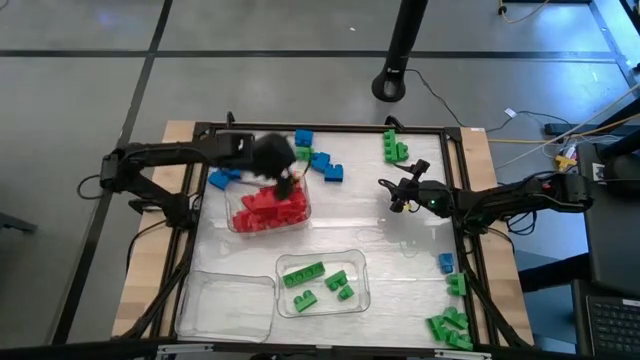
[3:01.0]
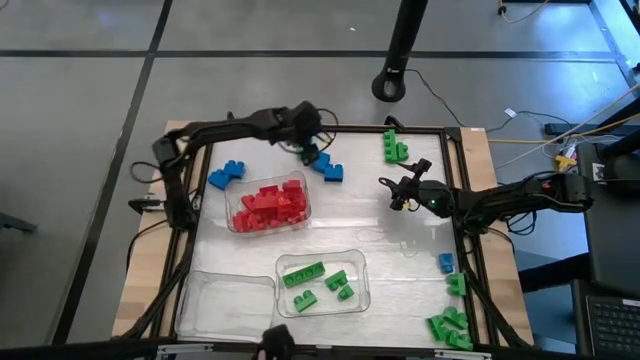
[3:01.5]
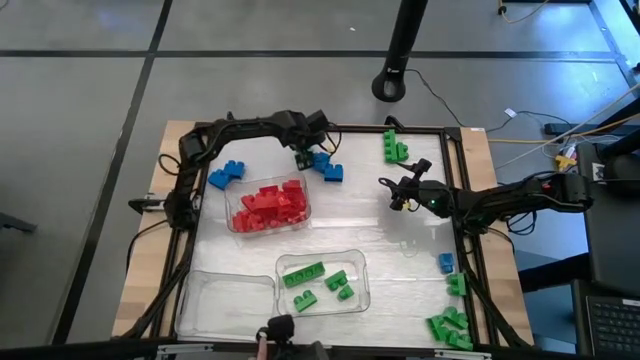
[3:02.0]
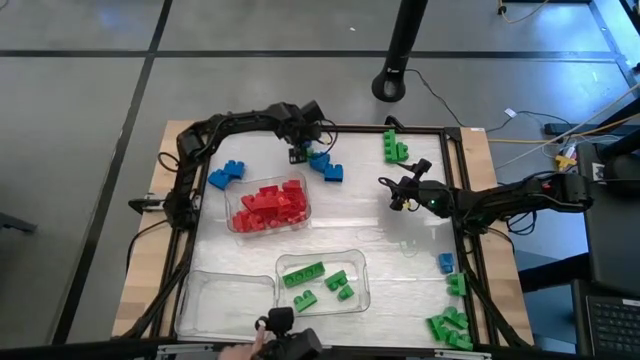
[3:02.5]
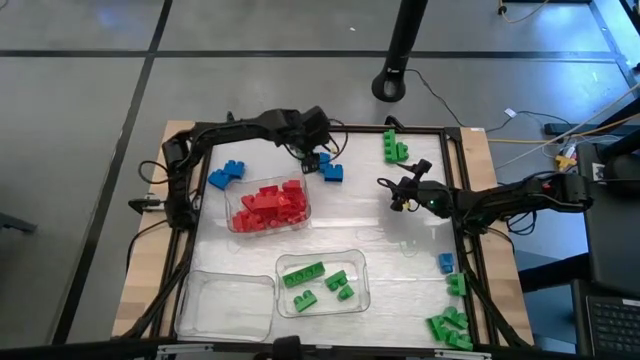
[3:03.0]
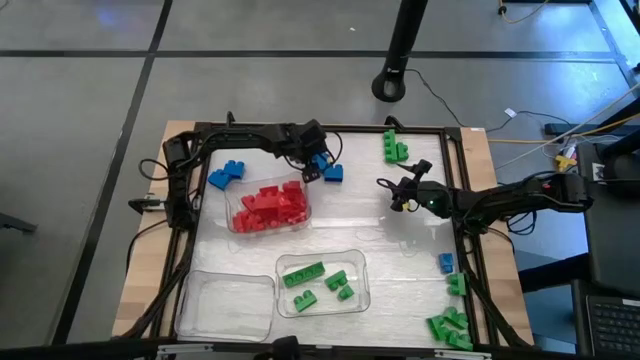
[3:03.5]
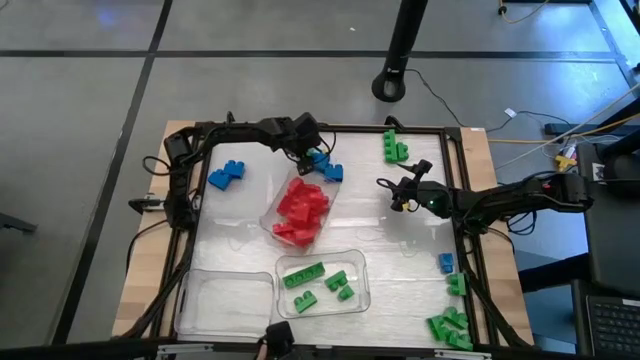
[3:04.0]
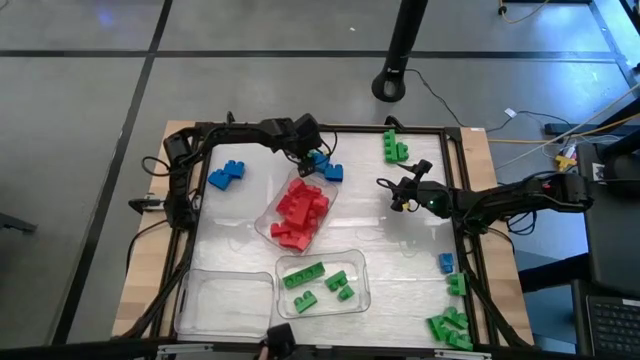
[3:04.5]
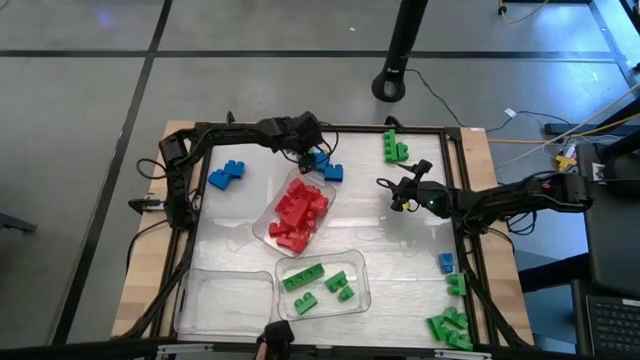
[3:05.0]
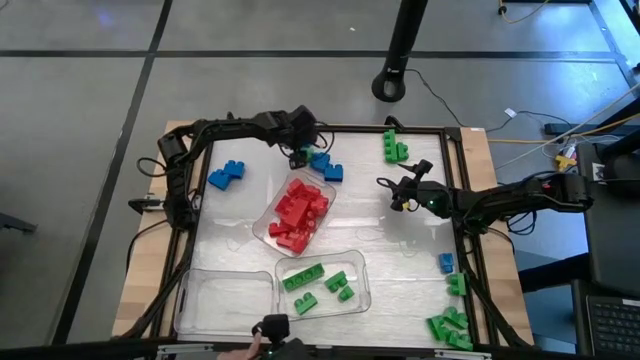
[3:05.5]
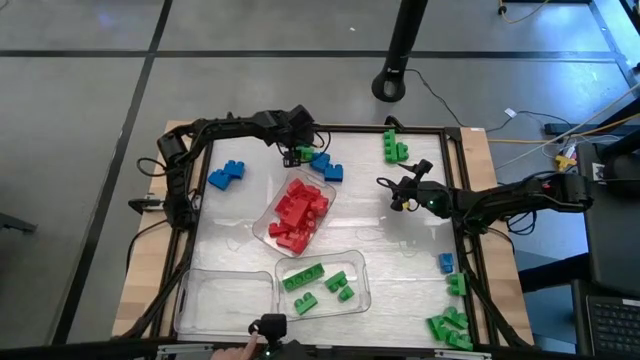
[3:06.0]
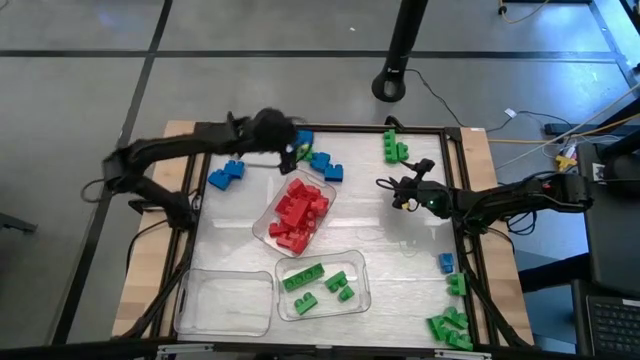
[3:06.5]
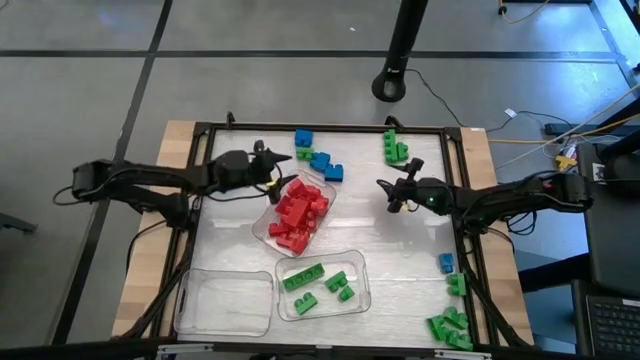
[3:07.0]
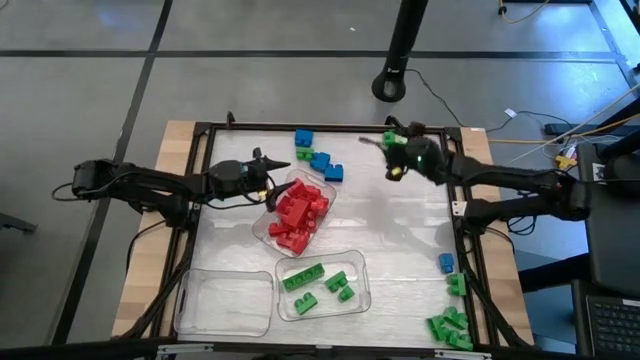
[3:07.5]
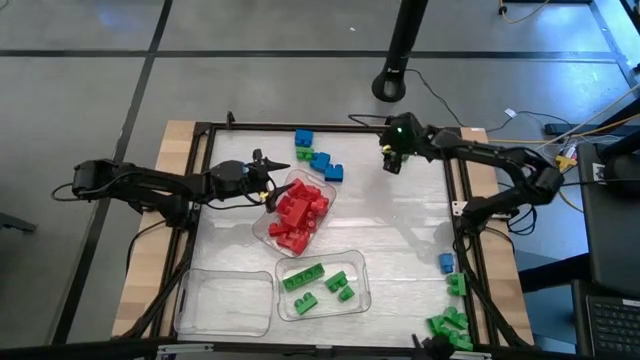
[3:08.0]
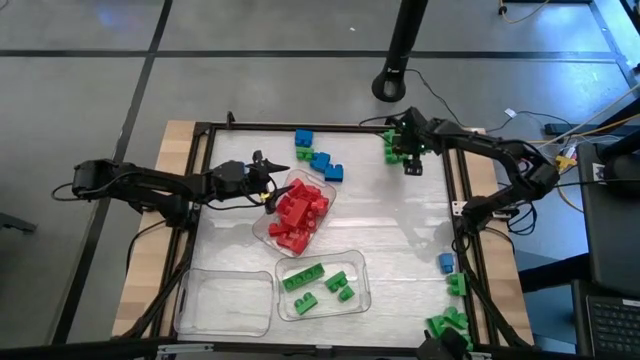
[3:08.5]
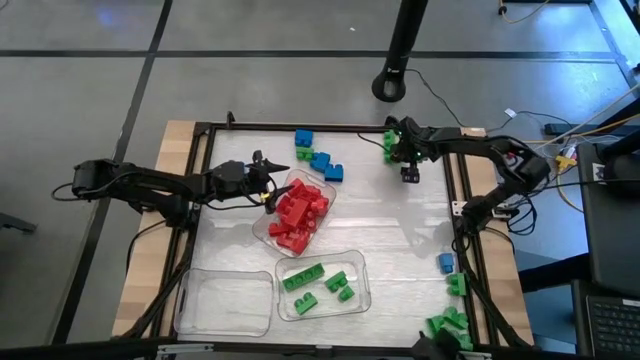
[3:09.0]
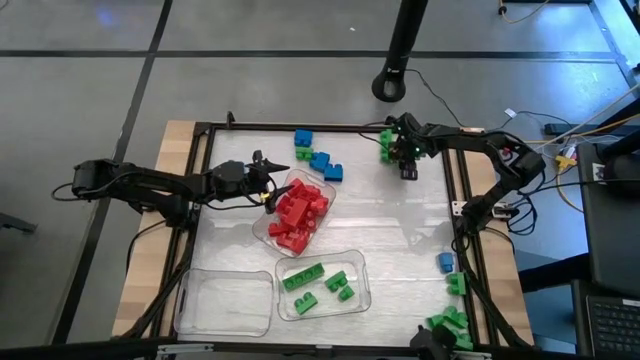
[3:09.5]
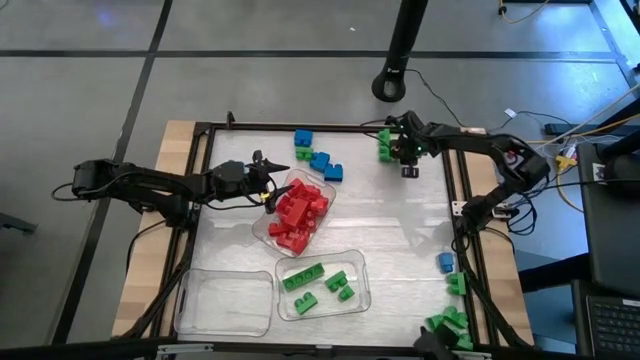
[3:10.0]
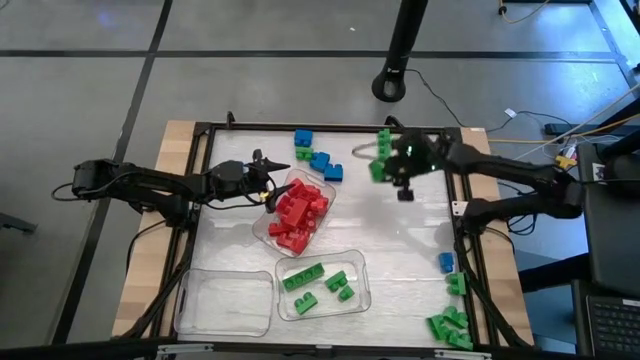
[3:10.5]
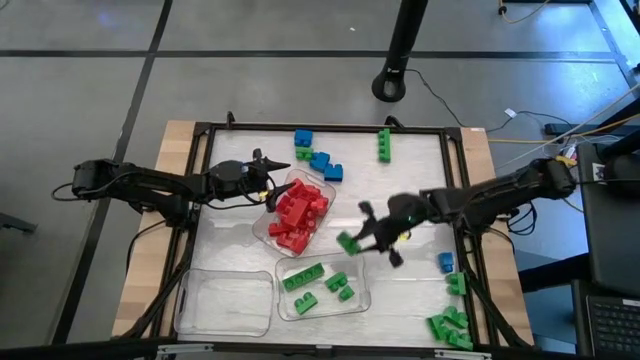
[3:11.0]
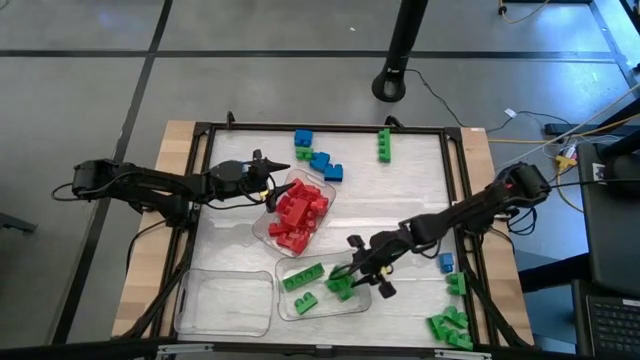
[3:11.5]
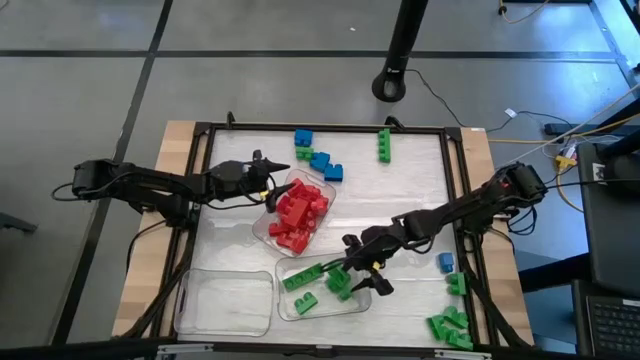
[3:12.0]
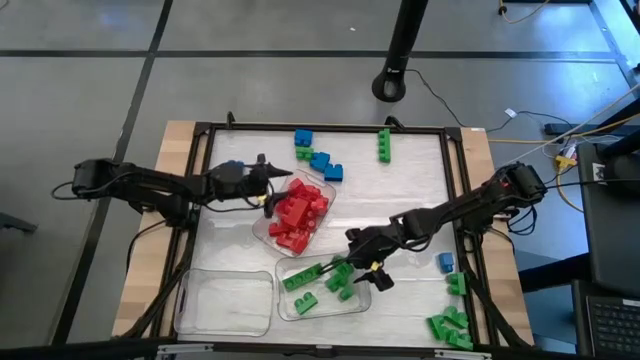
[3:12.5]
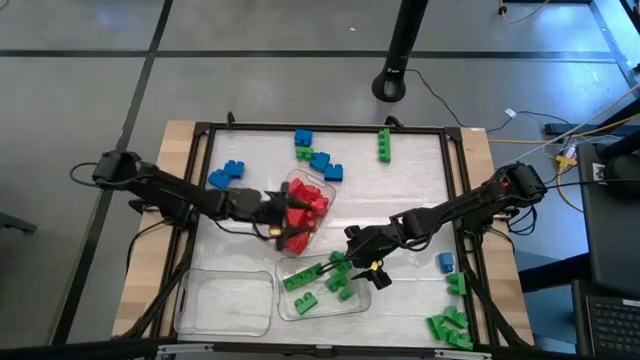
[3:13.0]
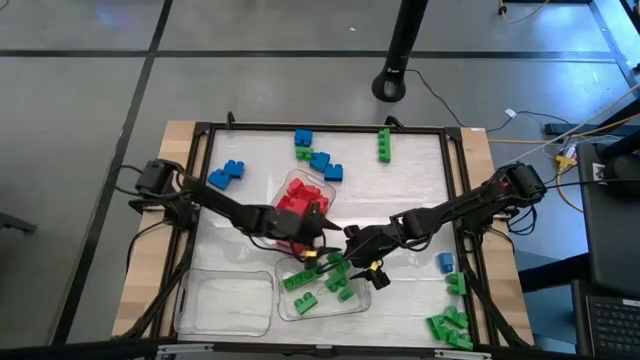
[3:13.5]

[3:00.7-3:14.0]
Task: Sort blocks
Put the green game piece into the bottom right transparent bin

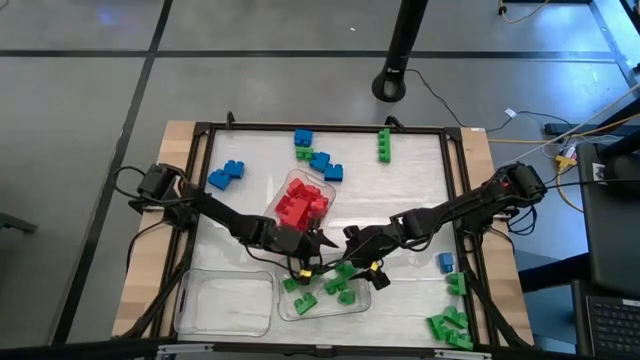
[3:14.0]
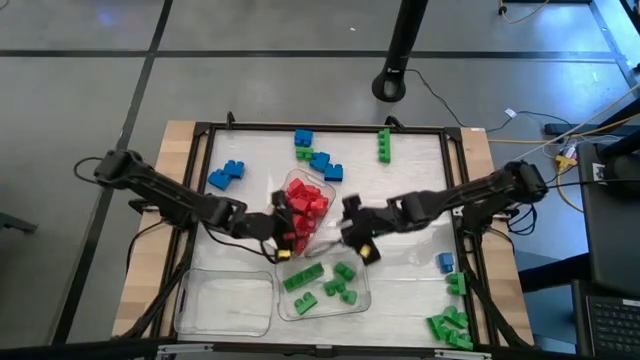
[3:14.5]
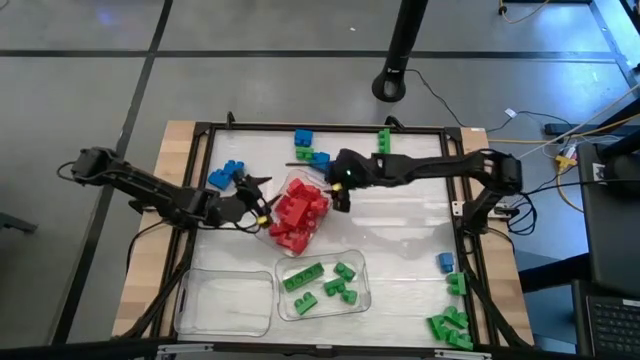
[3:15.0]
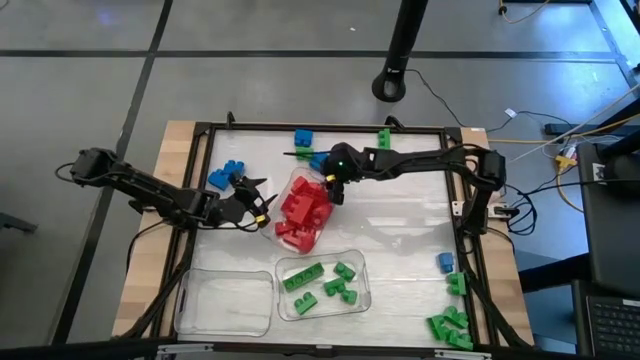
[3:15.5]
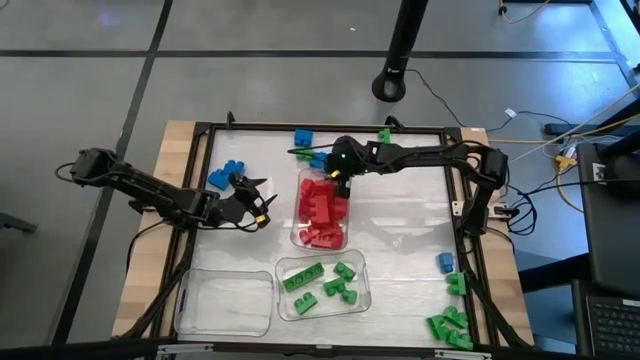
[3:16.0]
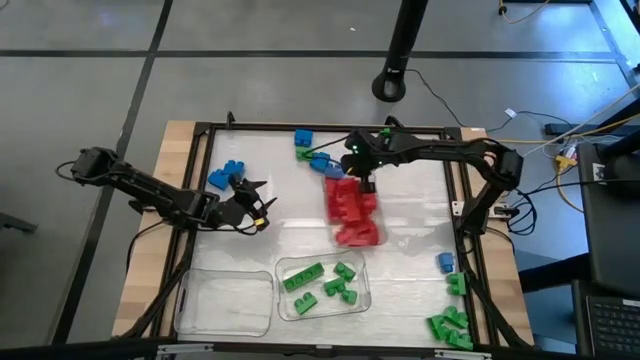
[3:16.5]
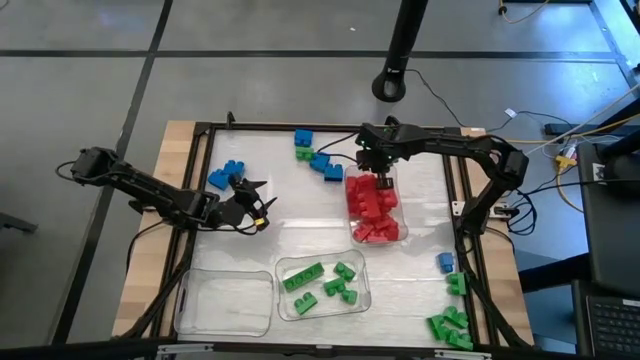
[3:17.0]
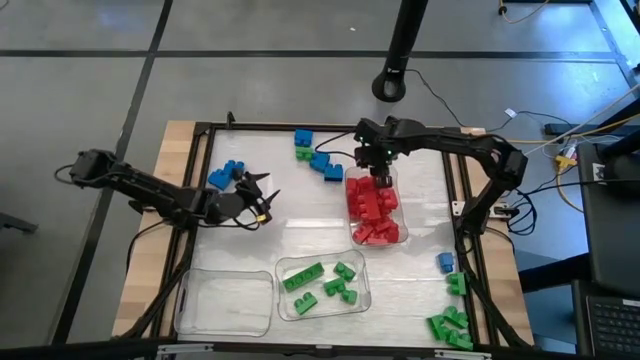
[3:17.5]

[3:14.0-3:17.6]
Adjust the top transparent bin

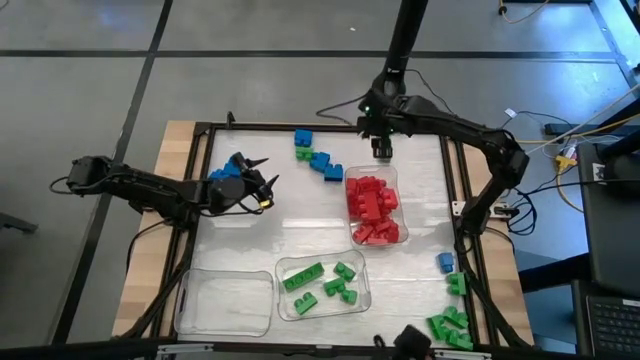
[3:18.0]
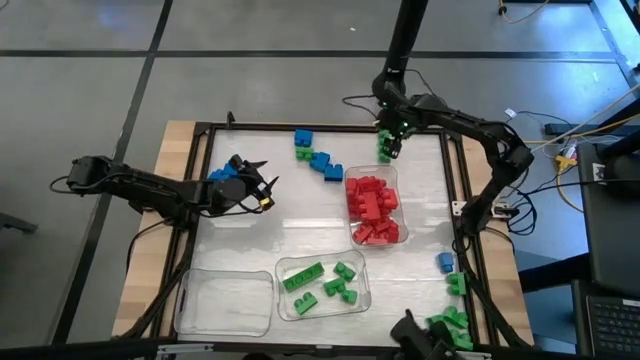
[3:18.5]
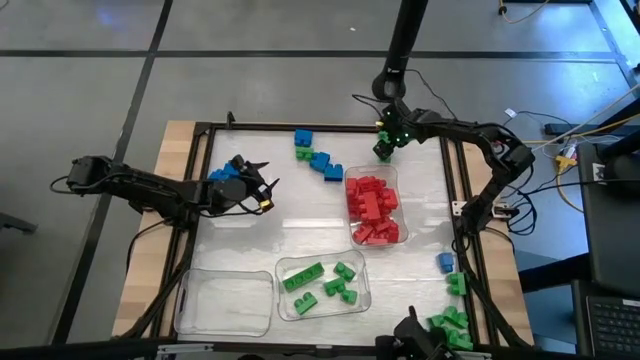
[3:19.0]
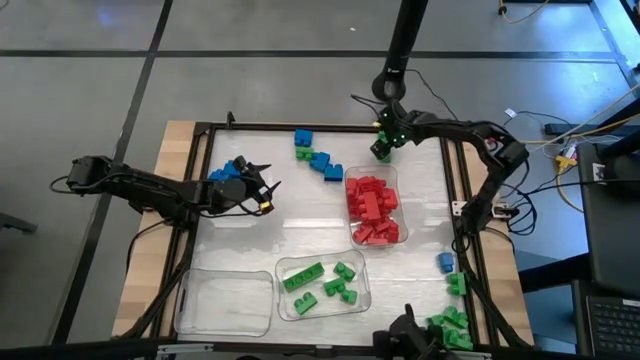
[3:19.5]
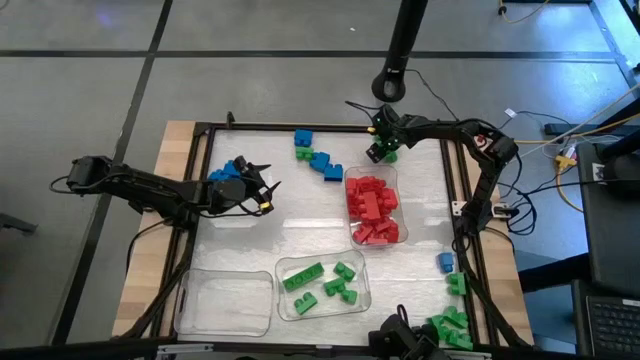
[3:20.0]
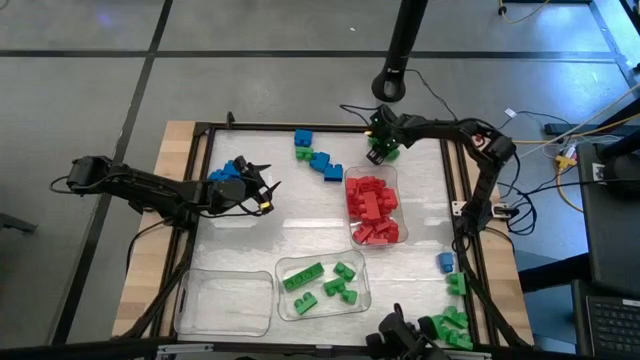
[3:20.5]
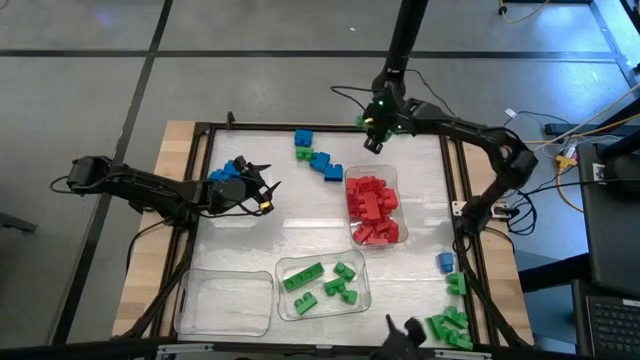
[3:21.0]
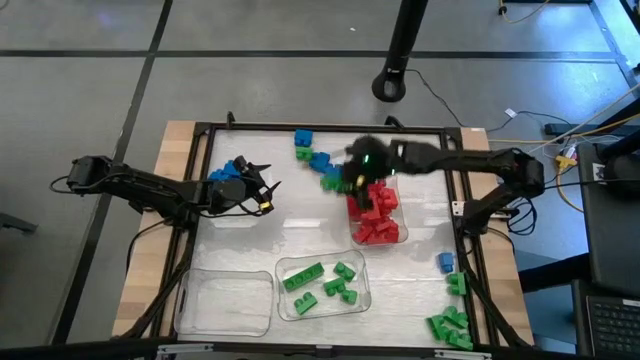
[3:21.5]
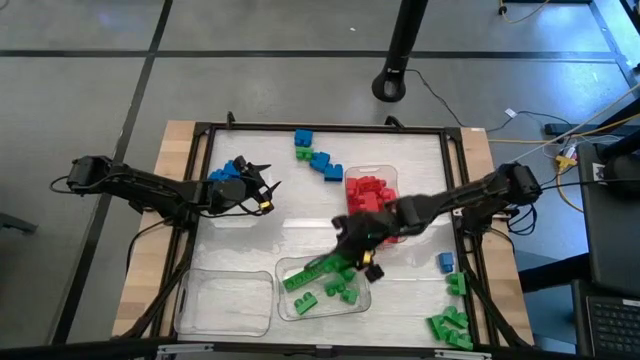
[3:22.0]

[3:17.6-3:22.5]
Put the green game piece into the bottom right transparent bin
